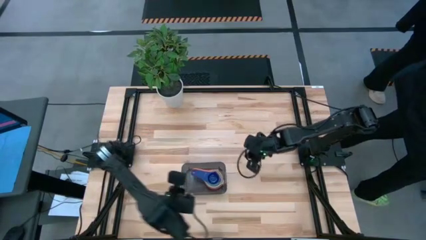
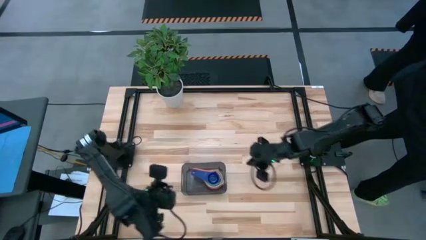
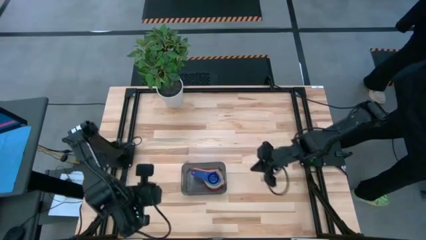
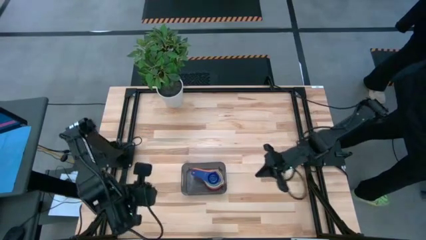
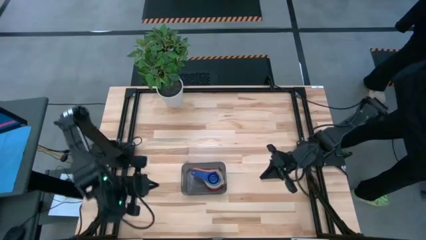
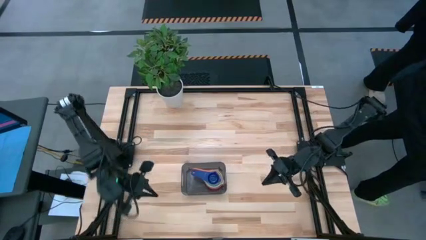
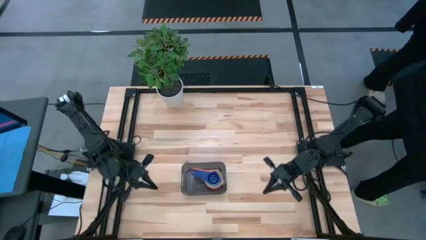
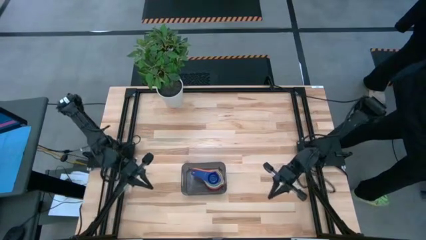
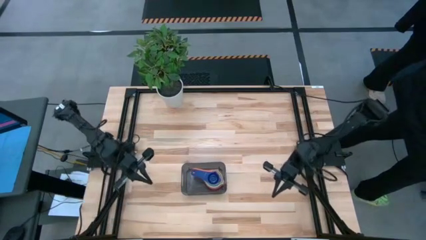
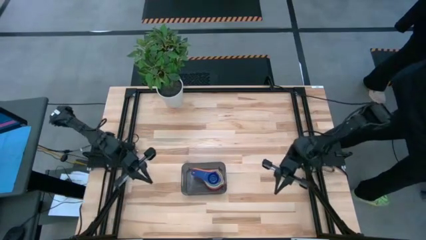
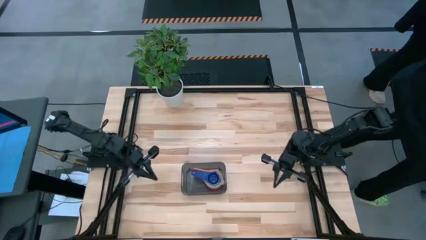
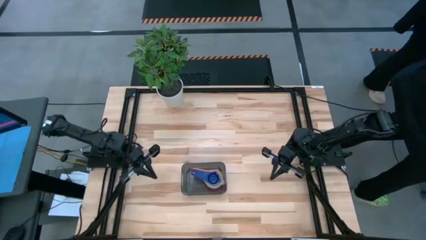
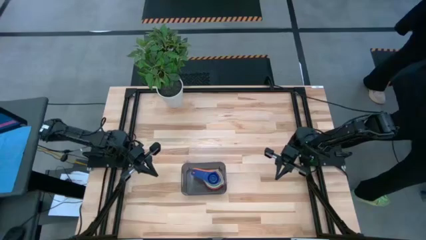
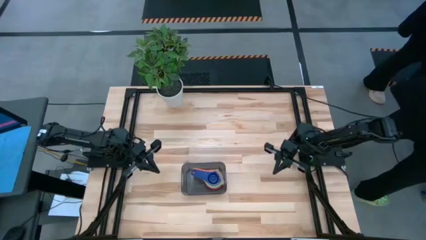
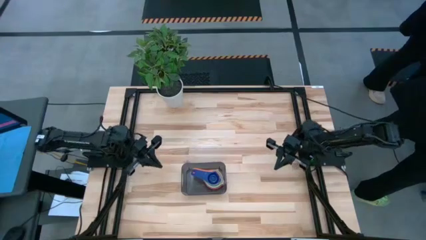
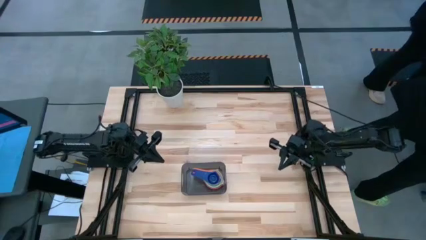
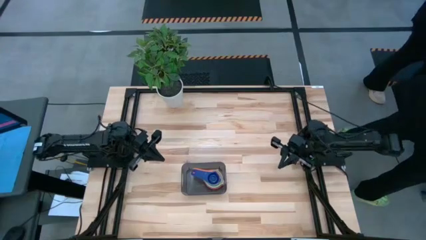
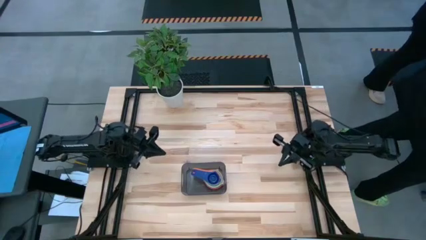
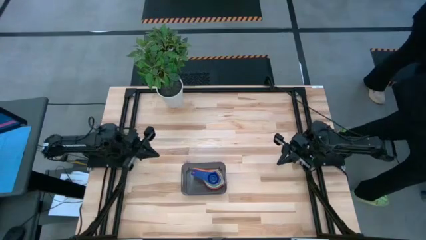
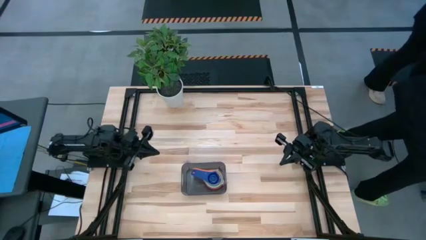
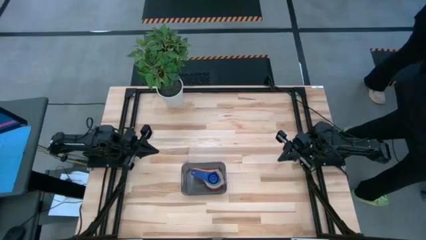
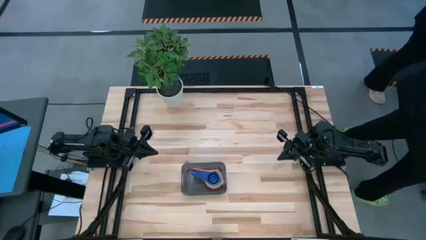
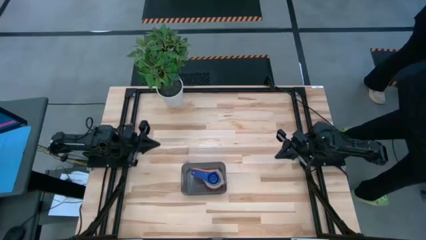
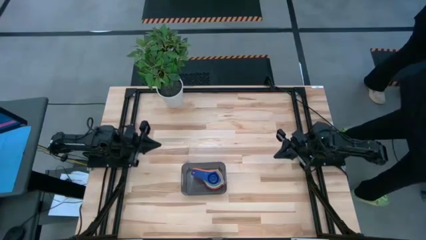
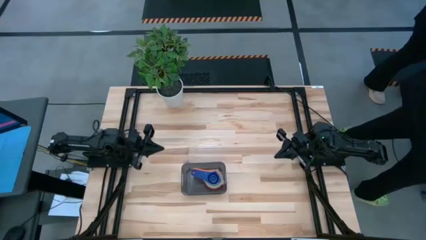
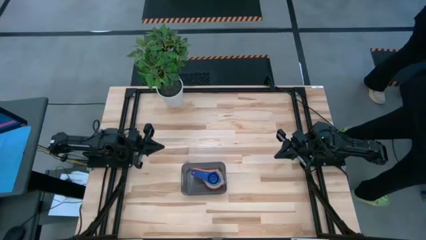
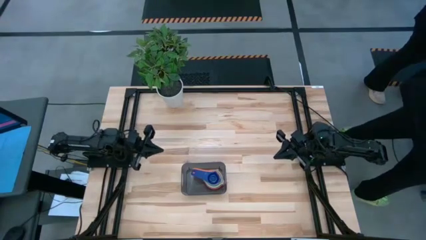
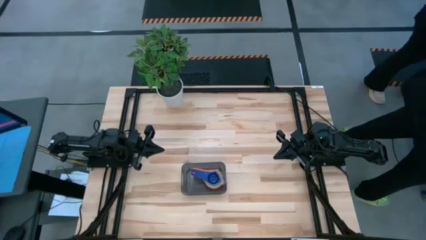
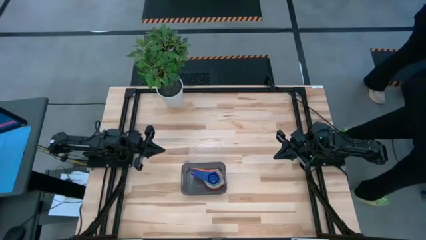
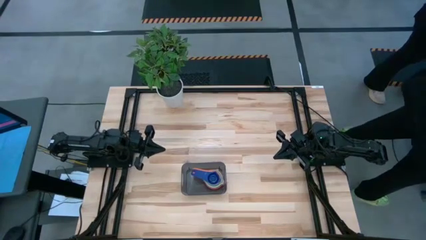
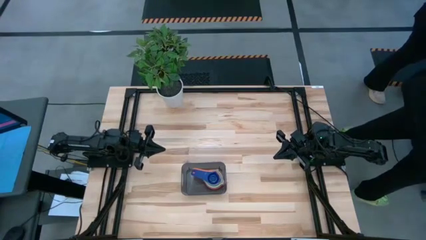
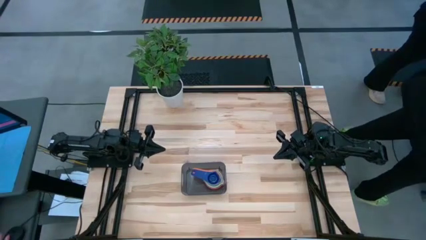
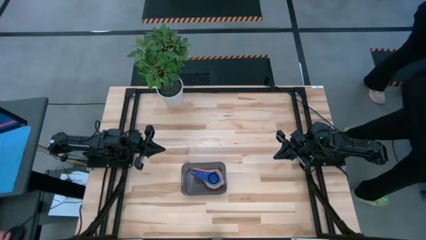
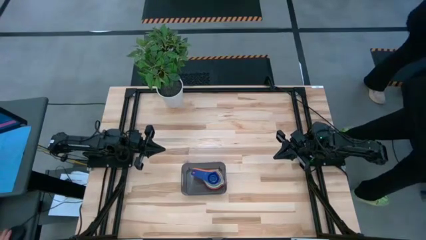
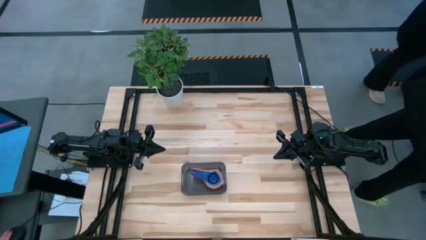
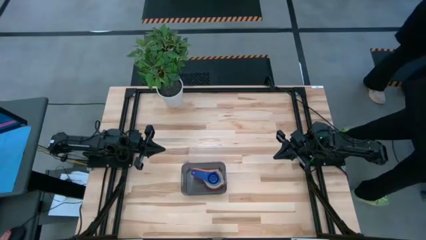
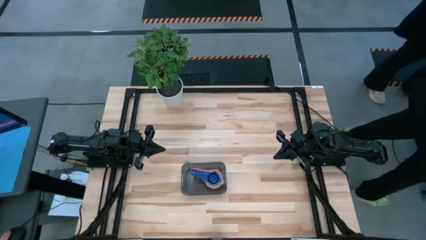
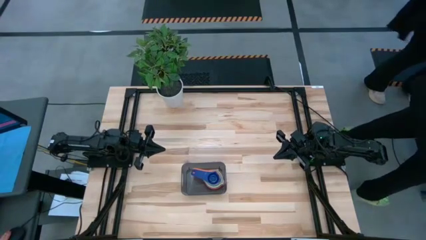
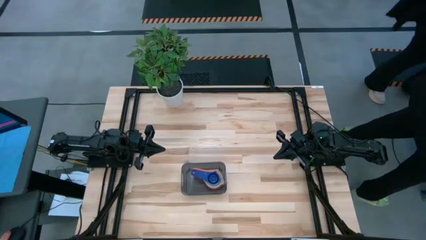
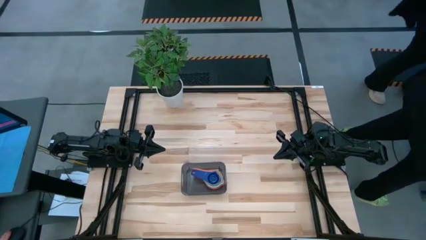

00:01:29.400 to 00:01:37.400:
Task: Nest measuring cups in basket
Return to Home Position
